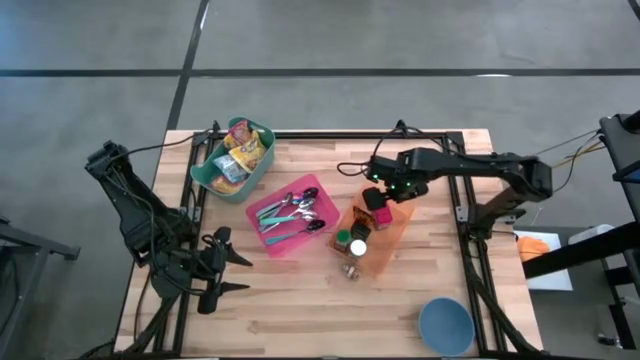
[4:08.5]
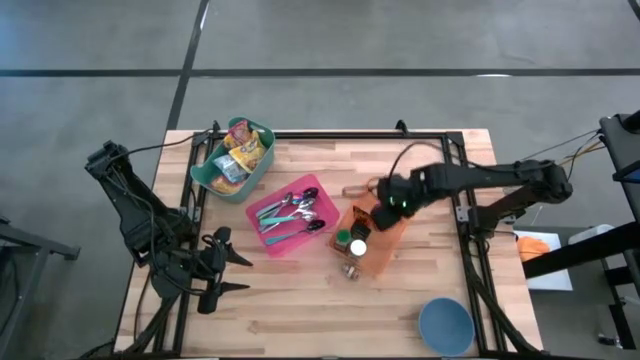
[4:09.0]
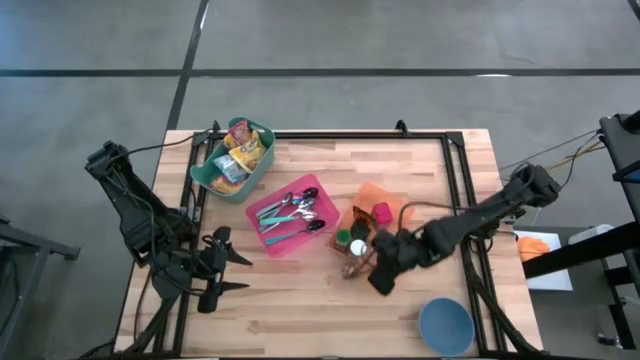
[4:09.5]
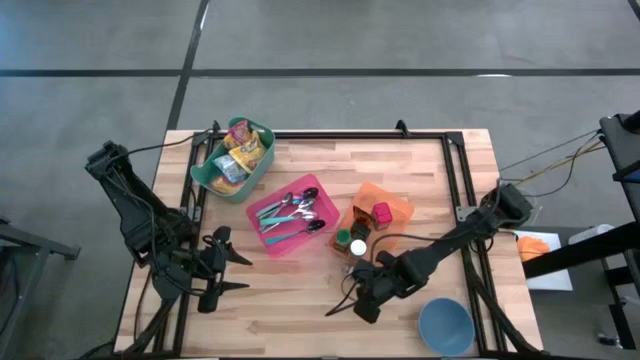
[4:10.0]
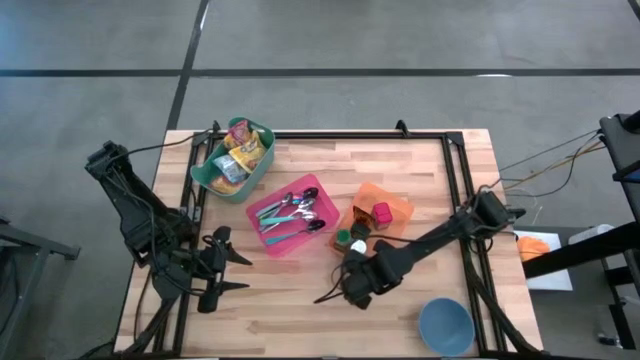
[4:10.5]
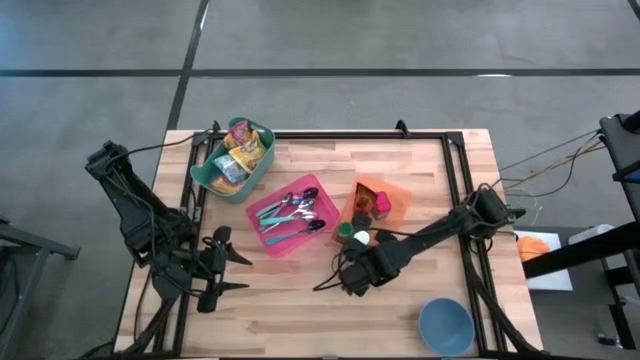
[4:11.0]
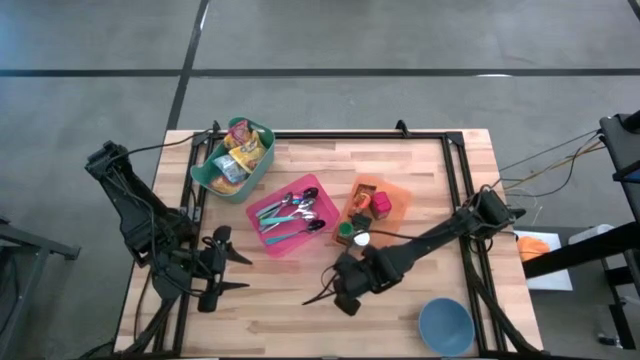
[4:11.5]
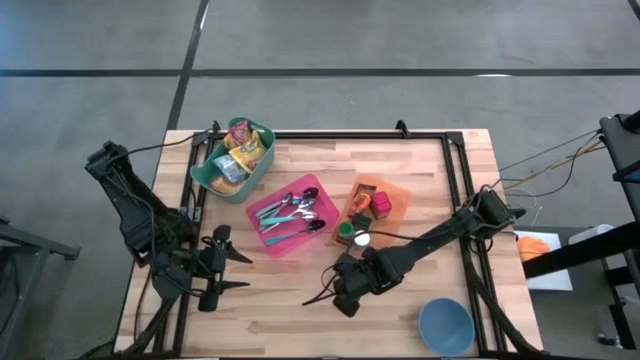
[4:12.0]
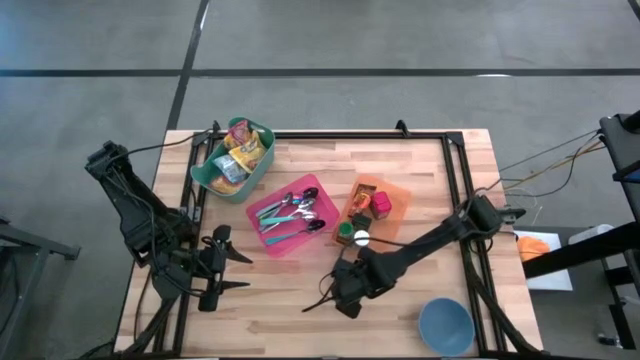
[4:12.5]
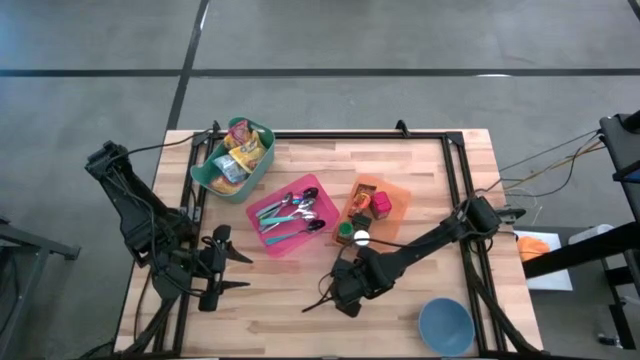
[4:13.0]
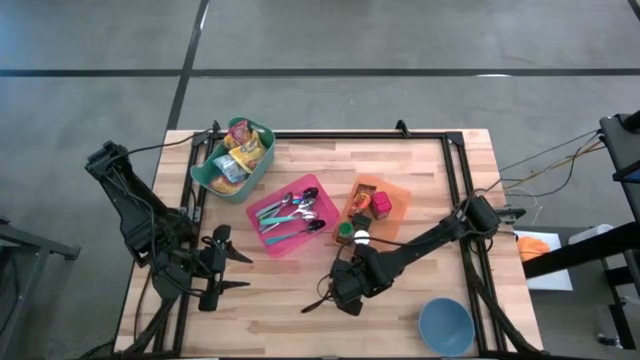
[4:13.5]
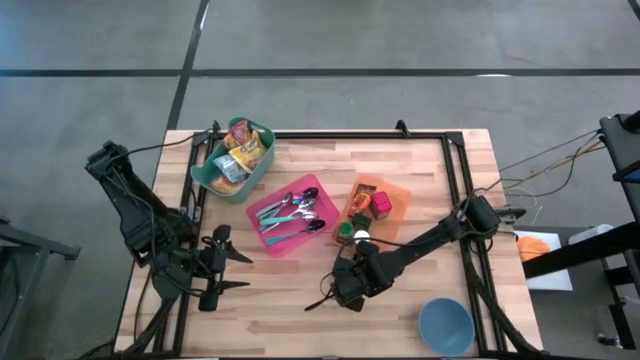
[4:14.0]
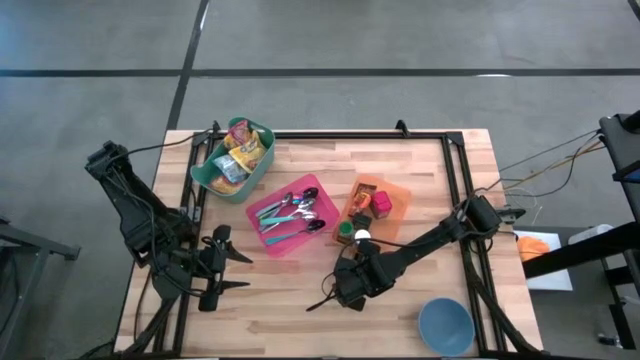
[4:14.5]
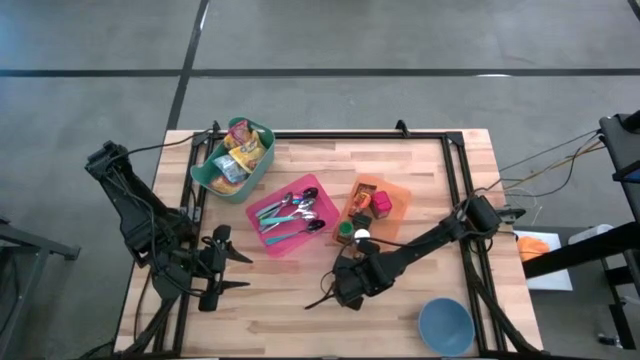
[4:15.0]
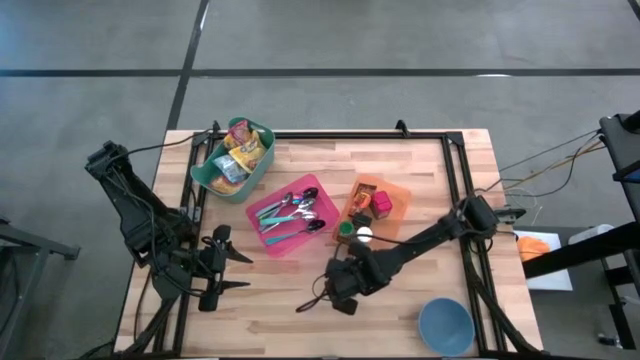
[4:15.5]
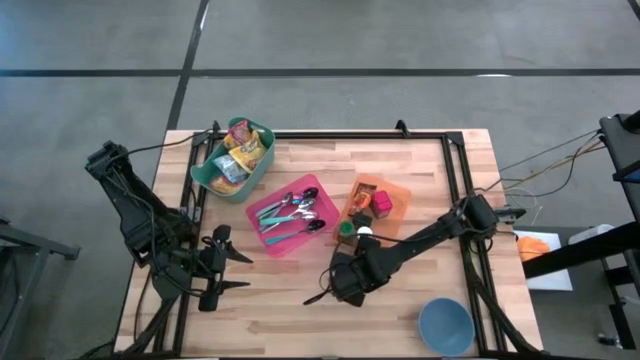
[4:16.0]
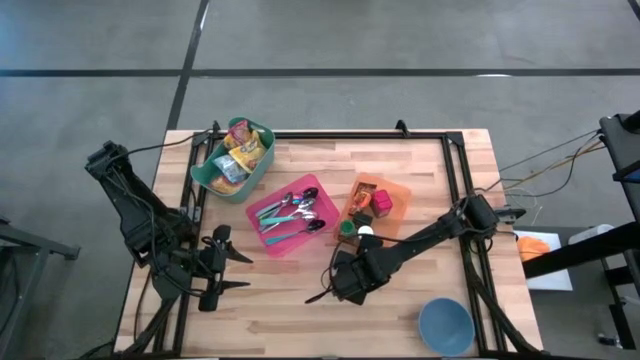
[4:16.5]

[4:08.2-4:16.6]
Put the brown seasoning bottle into the orange bin

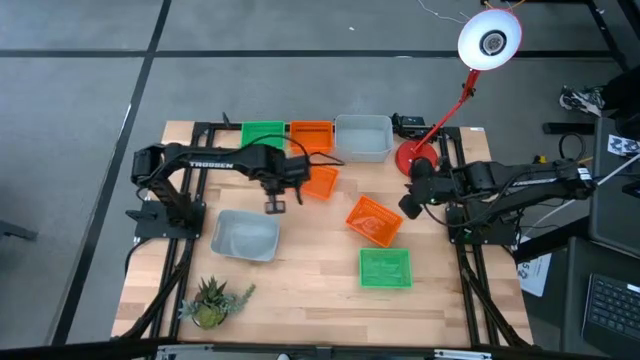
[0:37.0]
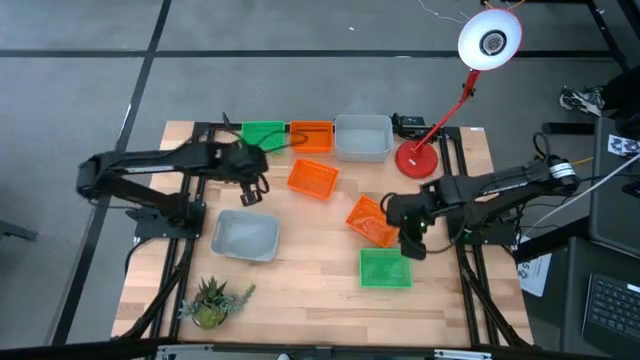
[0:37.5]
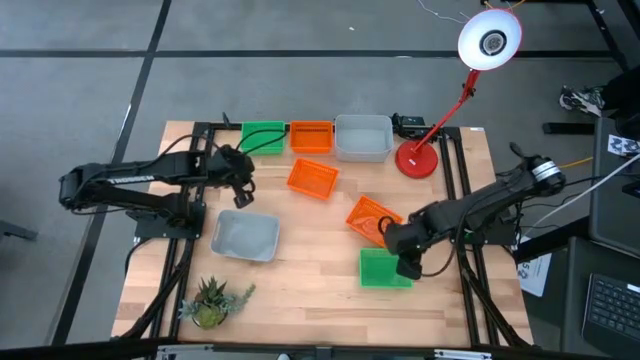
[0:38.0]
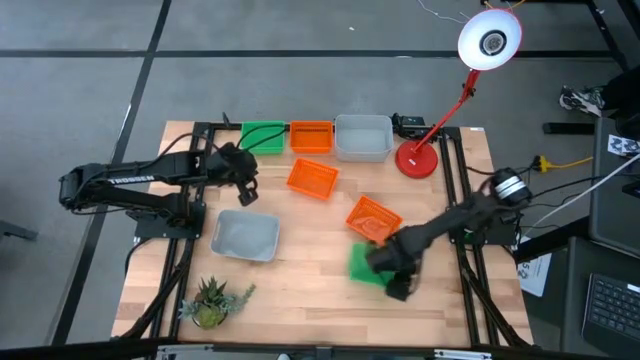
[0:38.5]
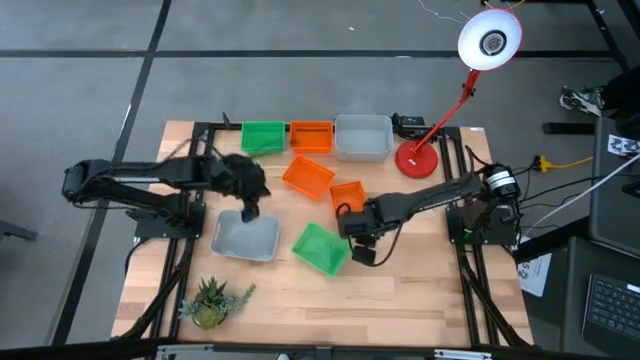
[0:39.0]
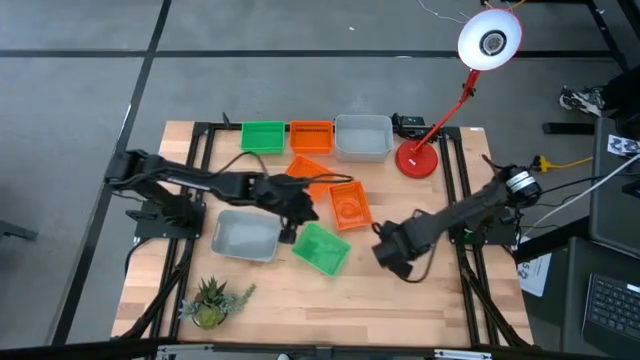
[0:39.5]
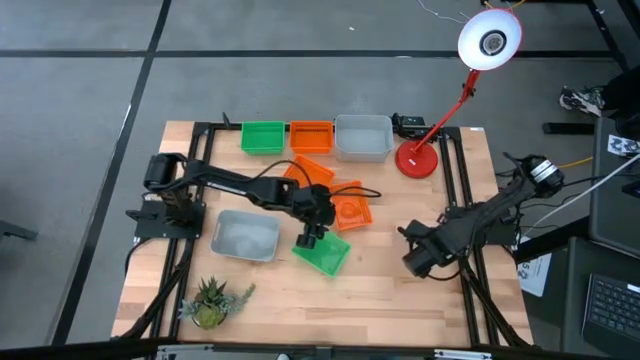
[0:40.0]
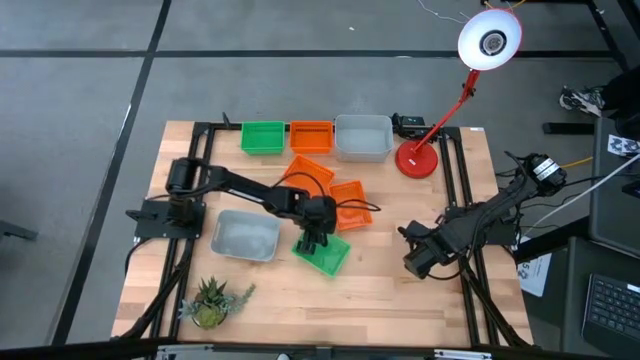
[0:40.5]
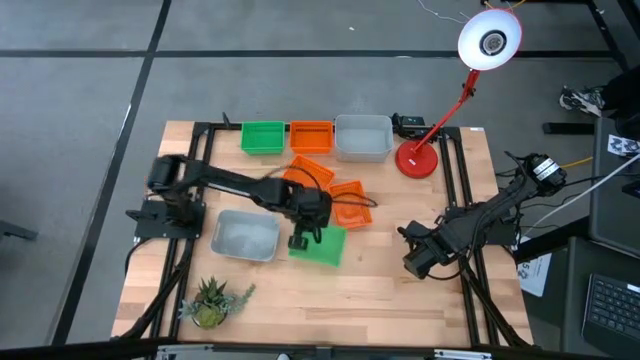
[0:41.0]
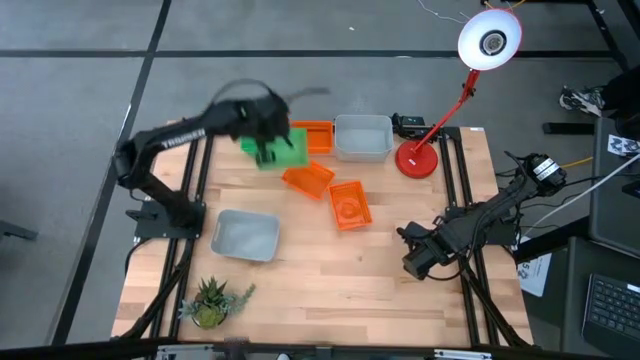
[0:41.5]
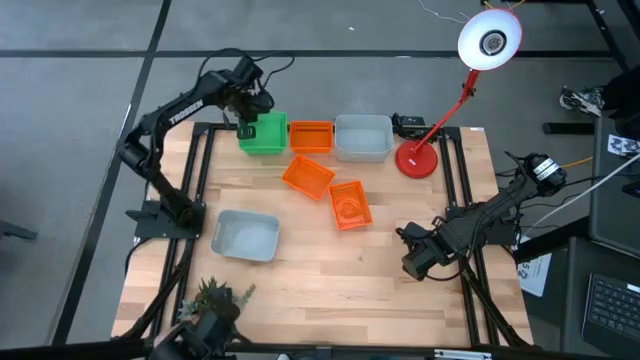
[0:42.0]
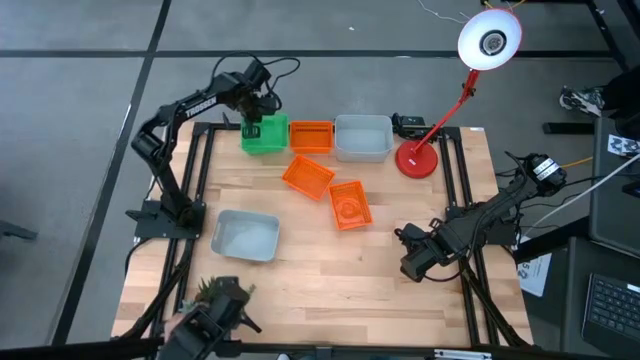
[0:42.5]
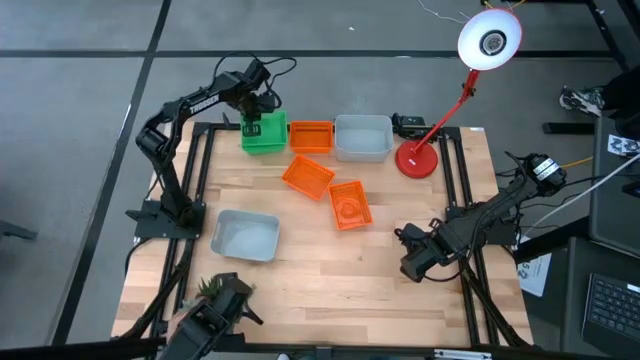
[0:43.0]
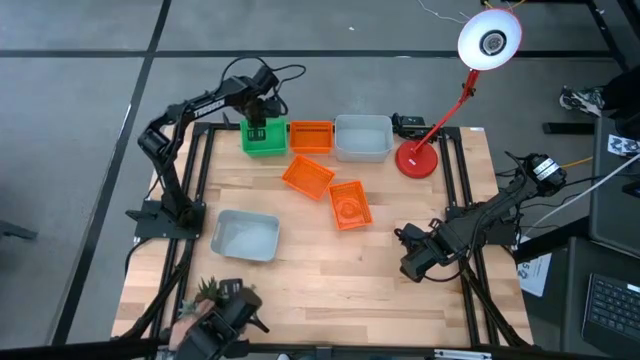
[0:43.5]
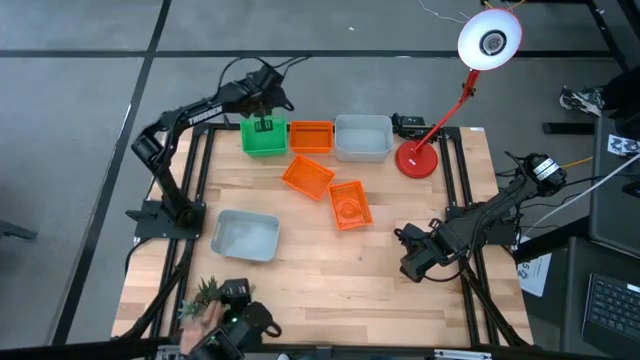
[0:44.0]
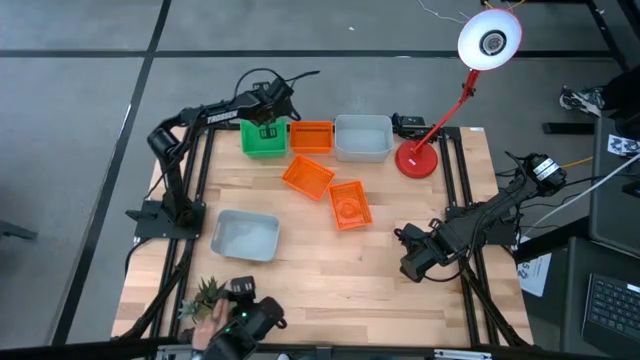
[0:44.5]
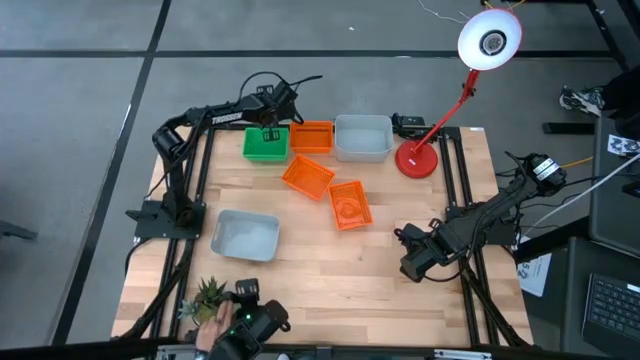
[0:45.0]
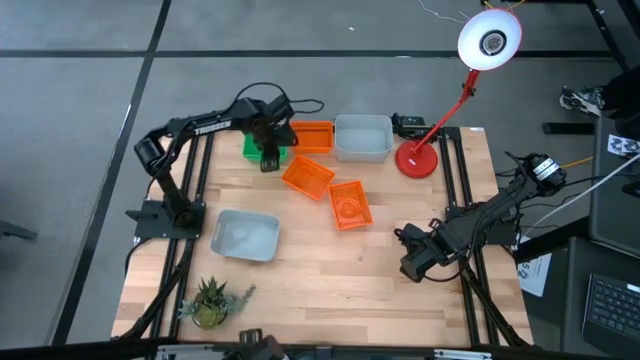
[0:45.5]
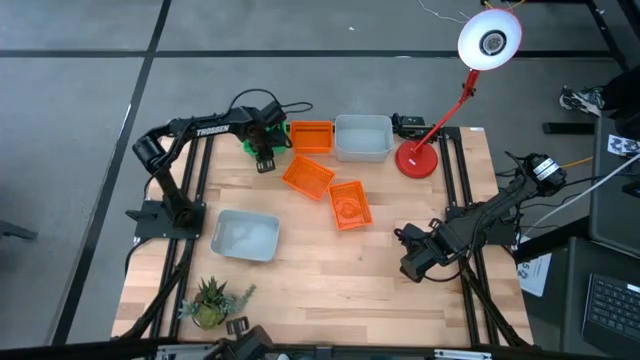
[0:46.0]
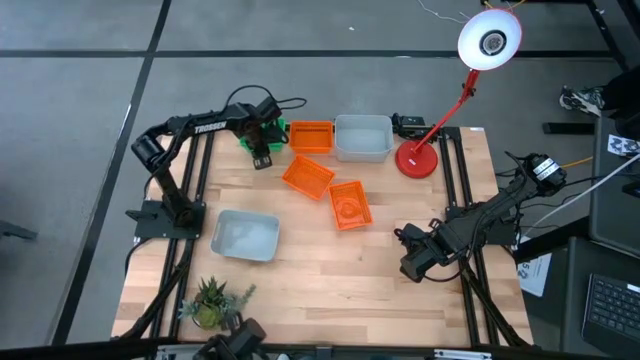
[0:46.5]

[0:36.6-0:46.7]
Stack the bottom green bin on top of the top green bin

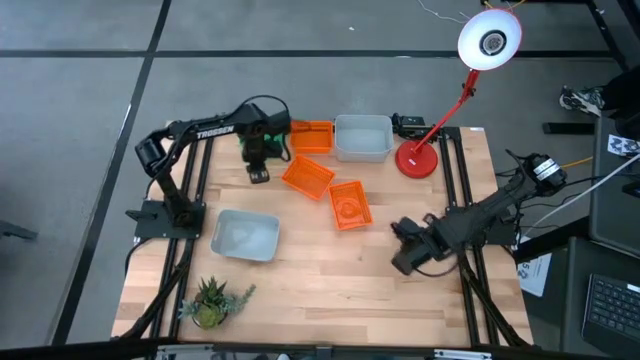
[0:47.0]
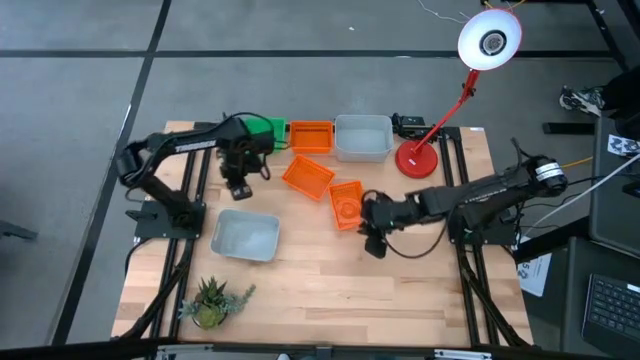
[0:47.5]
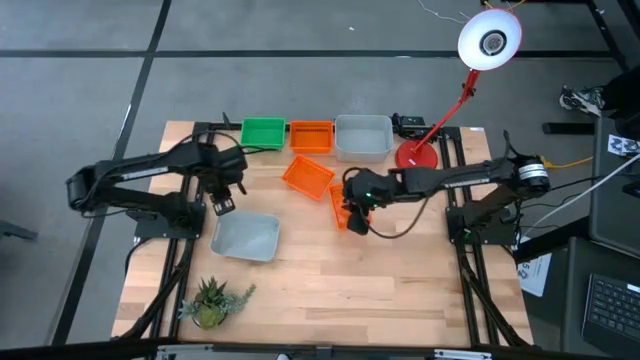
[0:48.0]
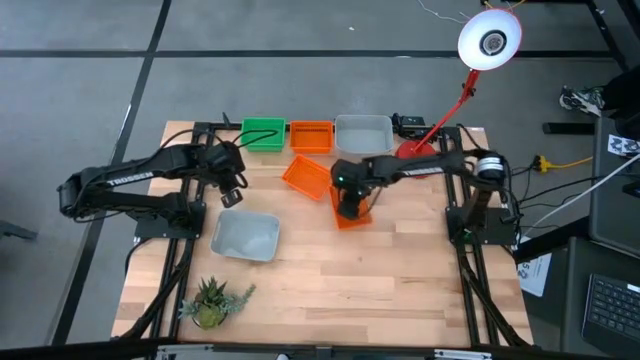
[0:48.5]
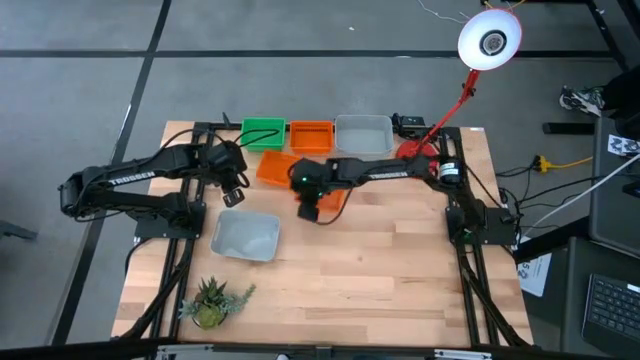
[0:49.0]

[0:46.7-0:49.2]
Adjust the bottom orange bin on the table
